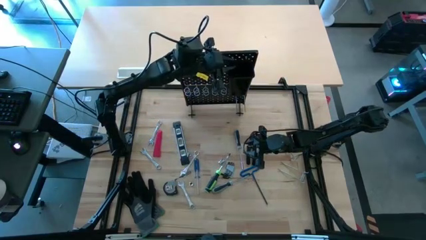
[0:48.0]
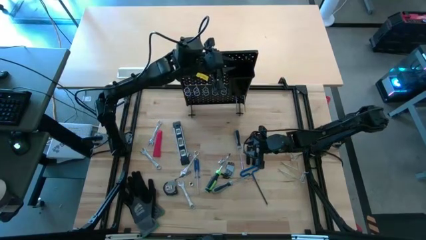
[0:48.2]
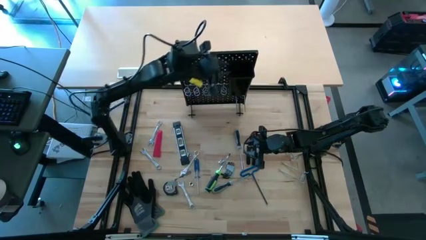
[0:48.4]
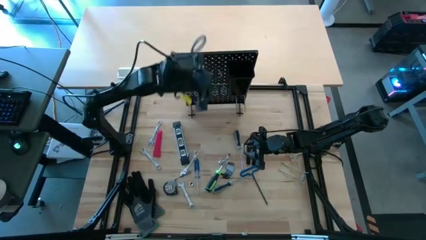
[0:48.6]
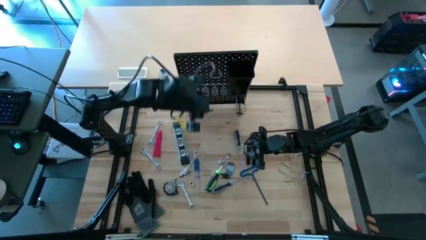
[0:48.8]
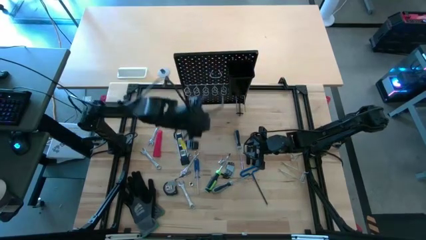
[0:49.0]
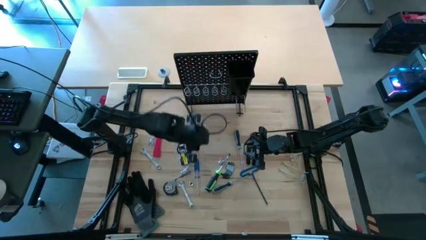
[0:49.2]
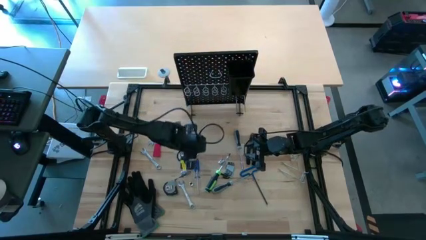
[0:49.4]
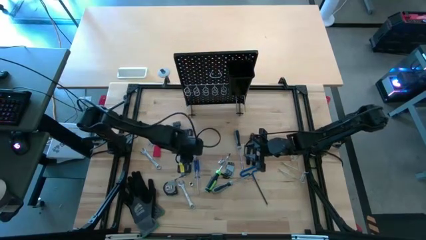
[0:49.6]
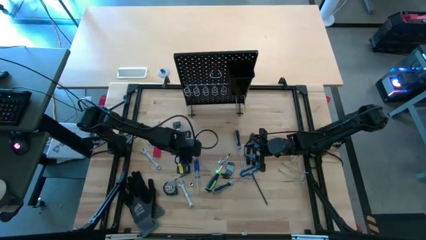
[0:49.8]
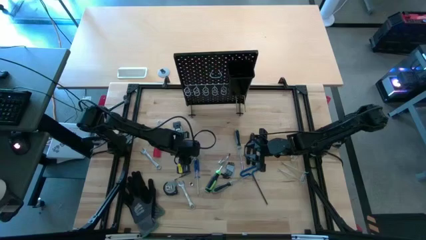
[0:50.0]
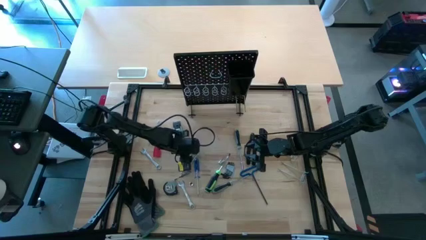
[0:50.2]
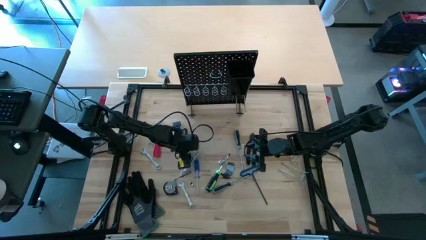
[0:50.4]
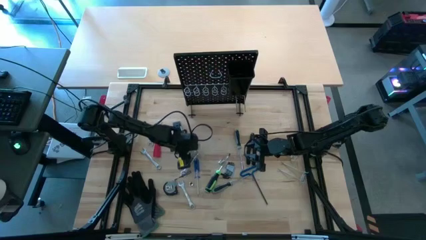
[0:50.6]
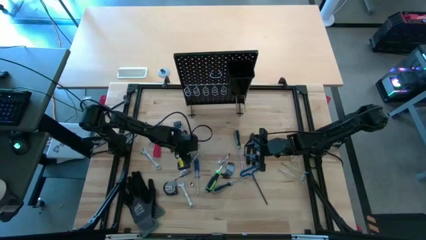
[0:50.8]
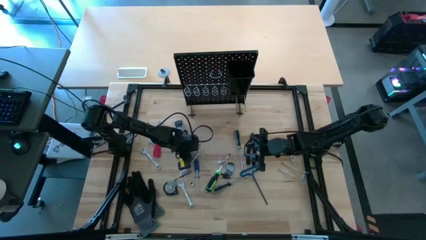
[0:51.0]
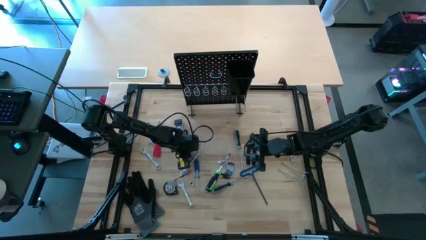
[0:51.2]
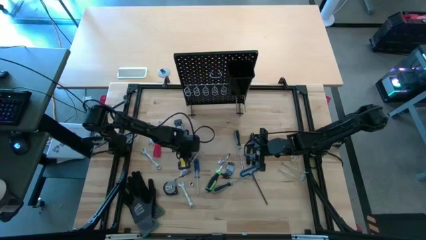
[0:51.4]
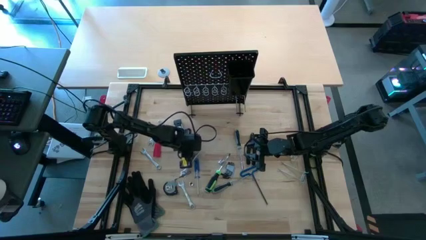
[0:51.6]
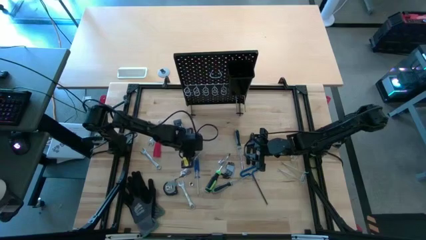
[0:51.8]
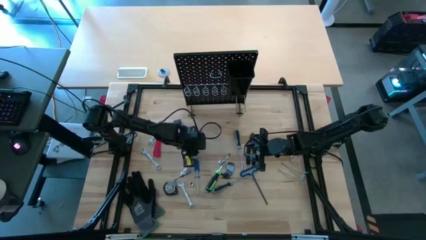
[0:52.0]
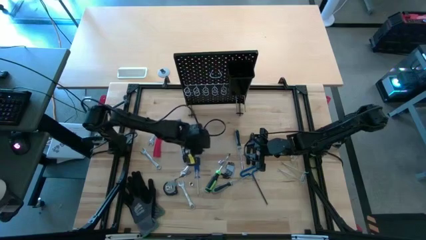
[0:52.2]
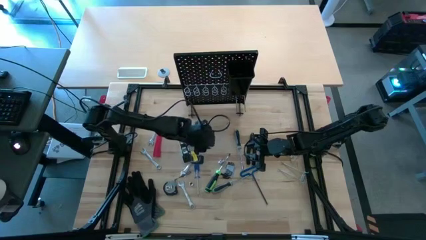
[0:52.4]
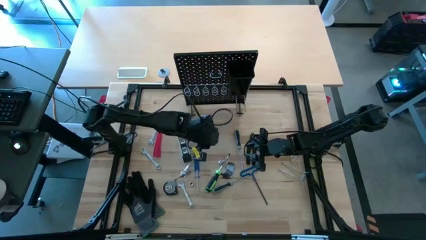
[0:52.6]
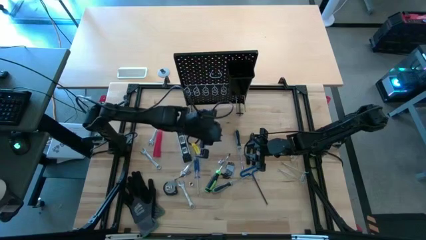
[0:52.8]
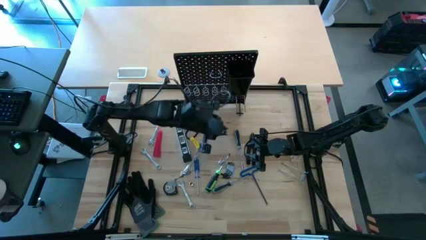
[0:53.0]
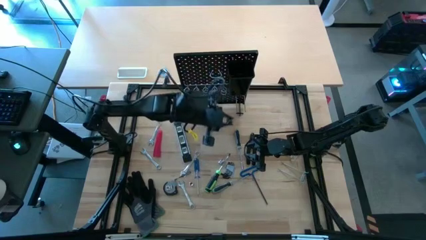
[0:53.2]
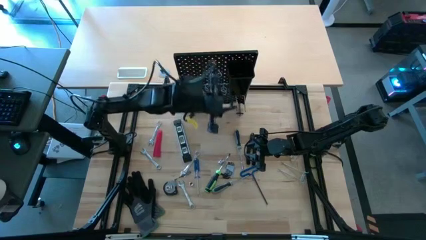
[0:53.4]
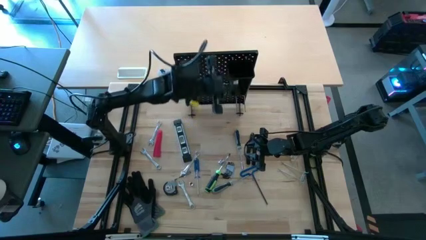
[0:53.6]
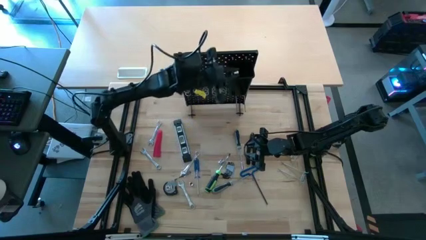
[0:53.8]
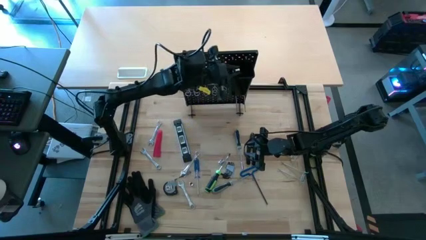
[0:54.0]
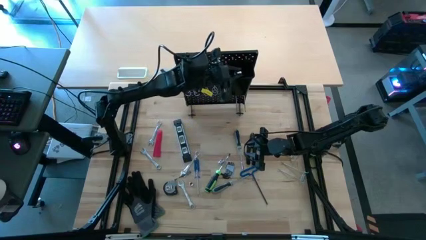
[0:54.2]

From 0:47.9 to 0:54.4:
Task: Hang tools onto peg board
Put the socket wrench into the pegboard bin

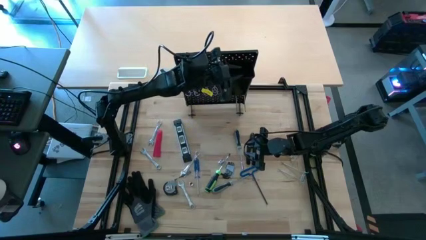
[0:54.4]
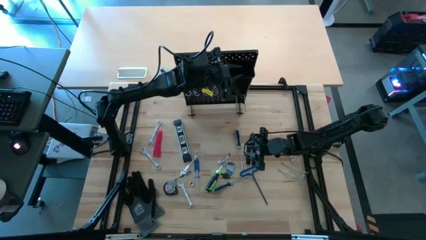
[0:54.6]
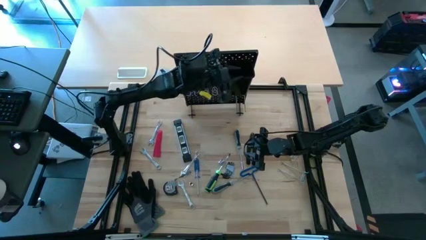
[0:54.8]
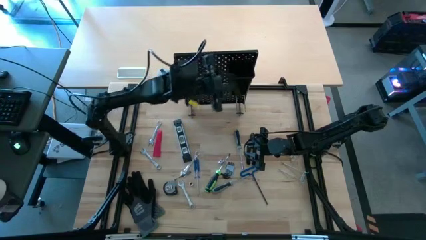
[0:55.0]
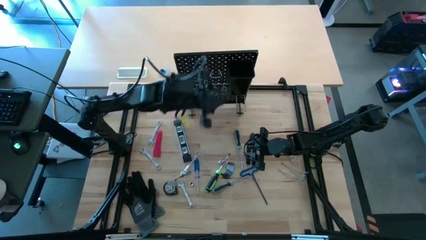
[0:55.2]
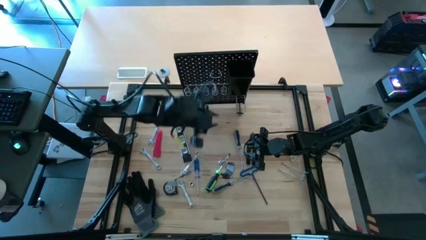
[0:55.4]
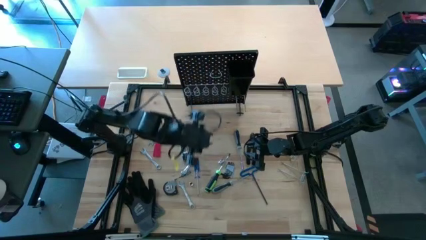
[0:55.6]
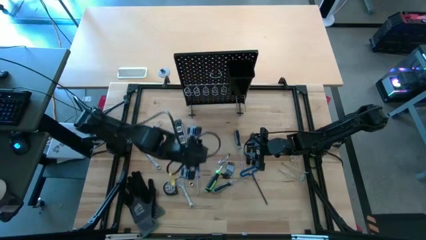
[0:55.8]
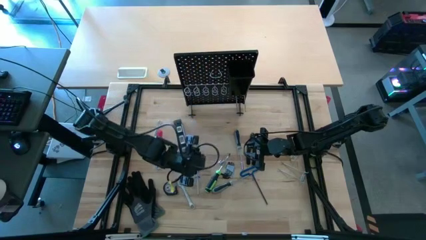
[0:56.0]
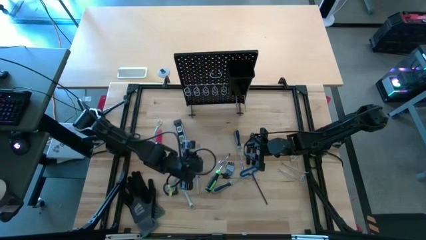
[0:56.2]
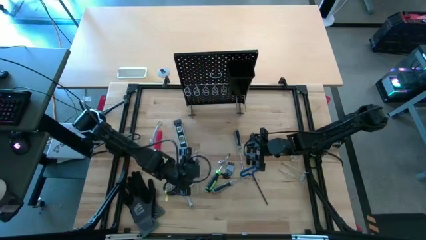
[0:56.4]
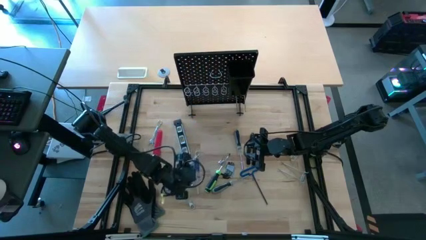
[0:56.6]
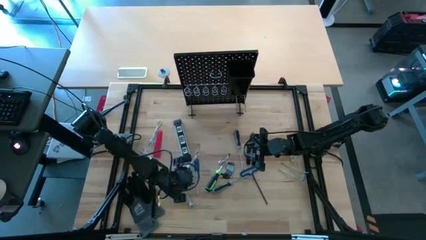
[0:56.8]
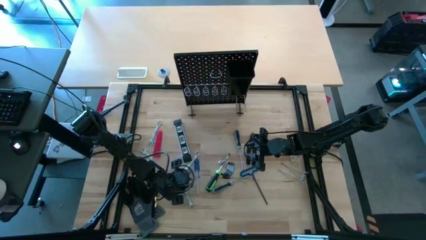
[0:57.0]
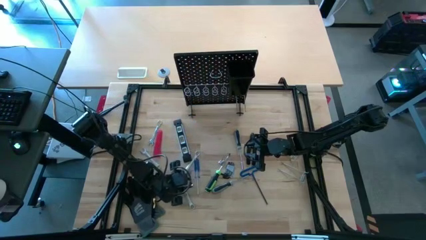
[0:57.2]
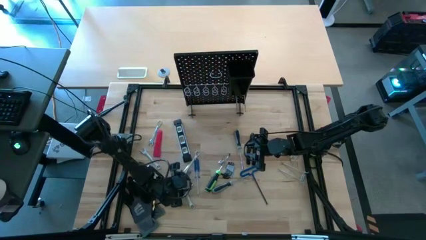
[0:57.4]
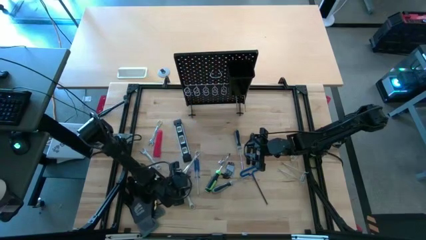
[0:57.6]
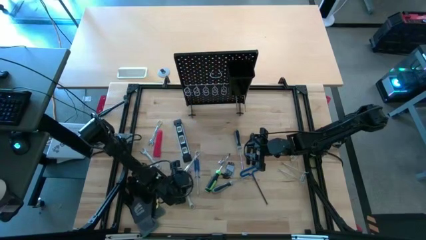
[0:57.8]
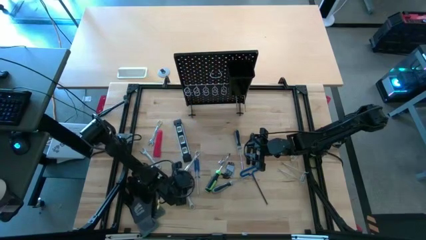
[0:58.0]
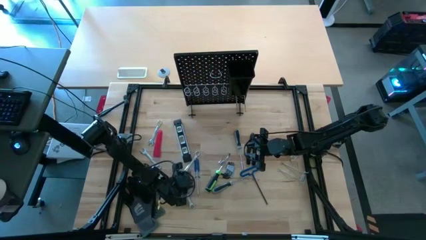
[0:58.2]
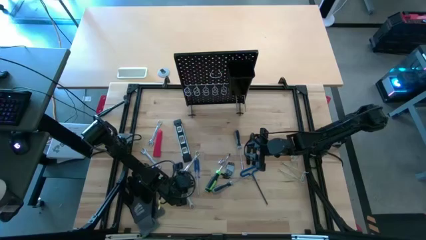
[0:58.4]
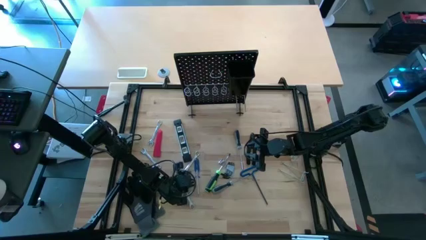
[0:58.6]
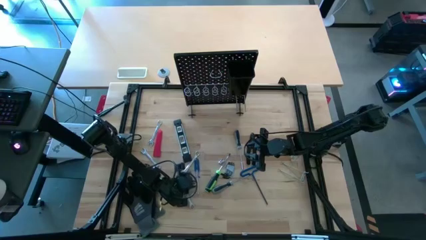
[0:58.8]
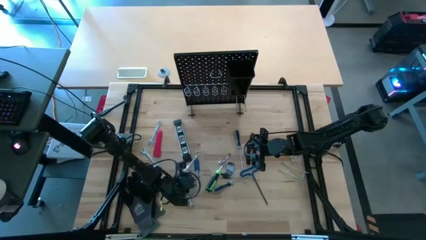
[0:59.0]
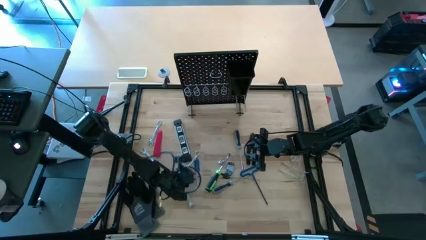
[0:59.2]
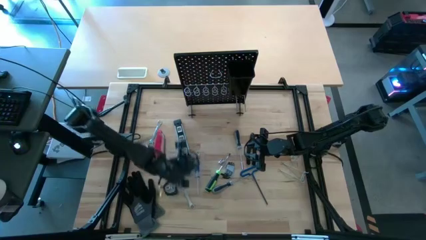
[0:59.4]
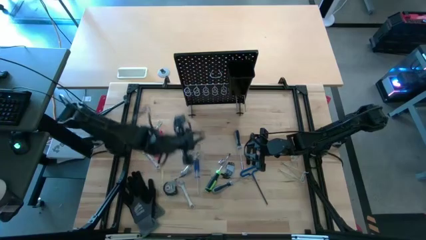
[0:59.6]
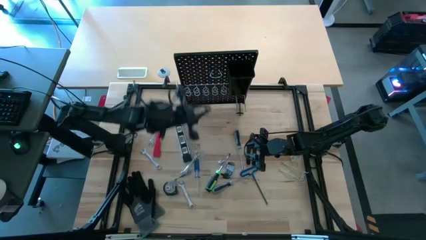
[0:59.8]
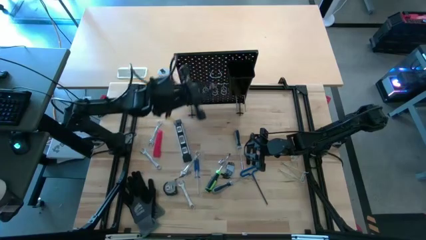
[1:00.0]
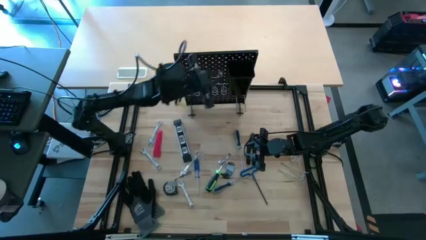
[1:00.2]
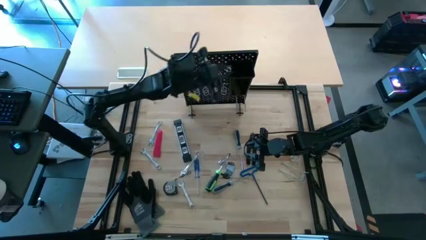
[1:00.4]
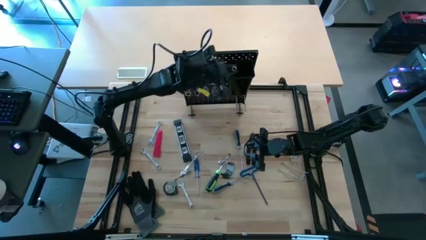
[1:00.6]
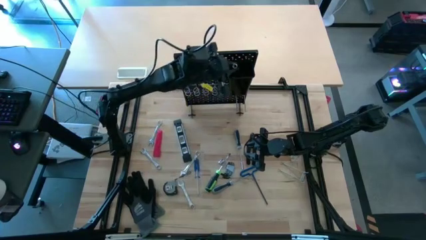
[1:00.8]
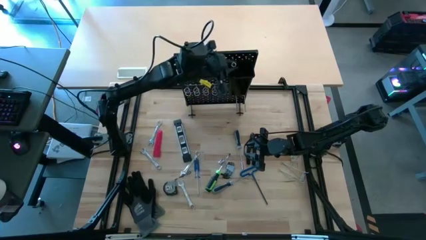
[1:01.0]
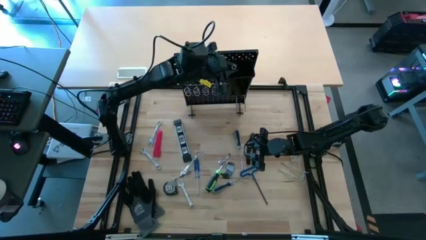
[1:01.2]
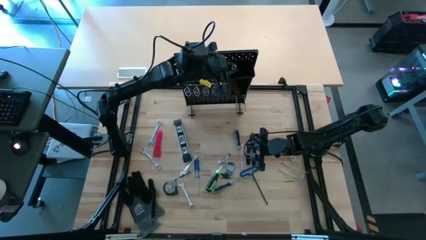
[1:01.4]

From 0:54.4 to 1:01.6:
Put the socket wrench into the pegboard bin

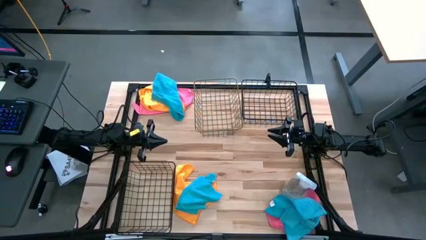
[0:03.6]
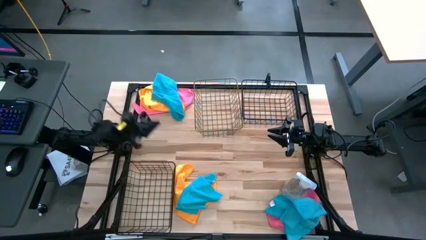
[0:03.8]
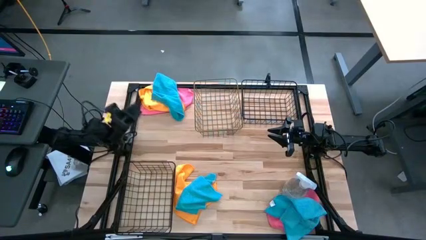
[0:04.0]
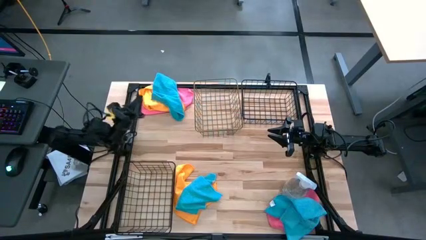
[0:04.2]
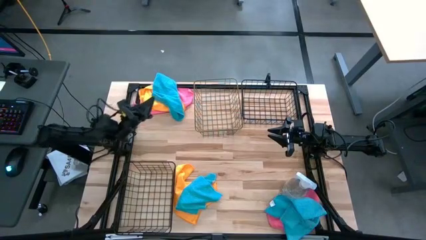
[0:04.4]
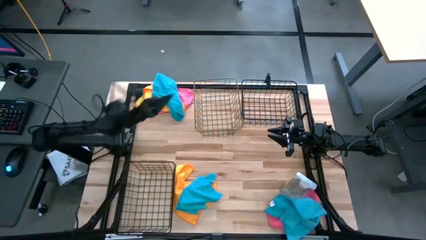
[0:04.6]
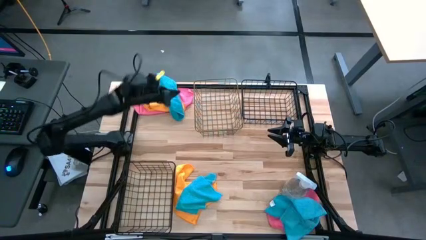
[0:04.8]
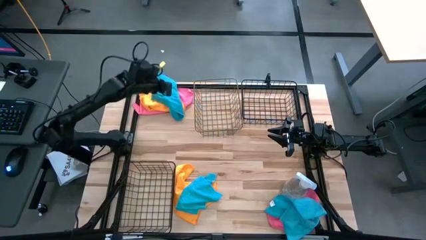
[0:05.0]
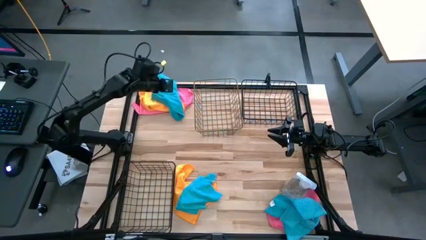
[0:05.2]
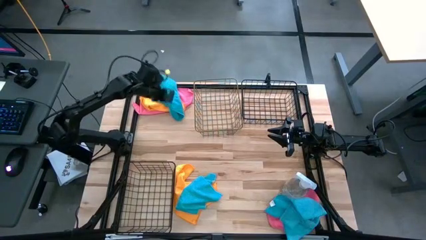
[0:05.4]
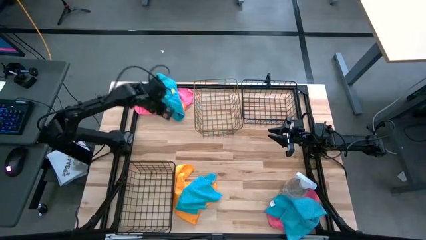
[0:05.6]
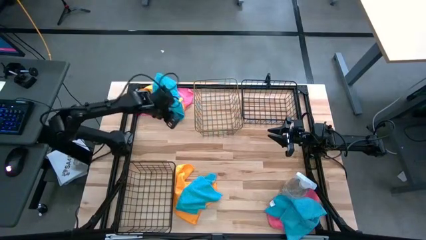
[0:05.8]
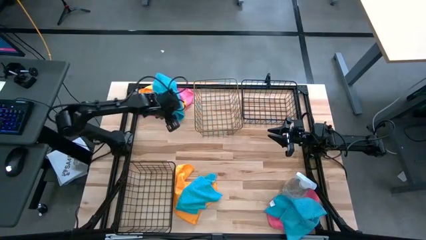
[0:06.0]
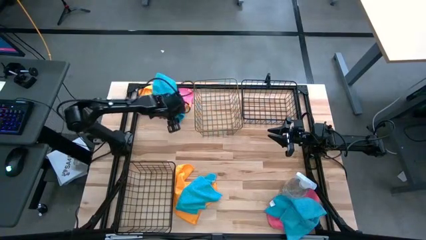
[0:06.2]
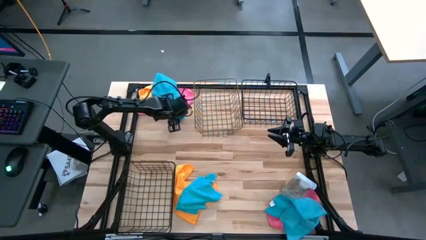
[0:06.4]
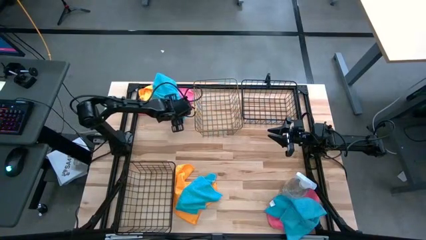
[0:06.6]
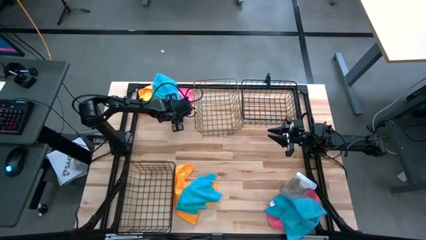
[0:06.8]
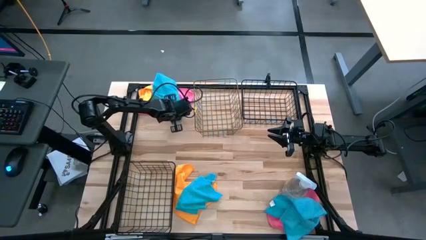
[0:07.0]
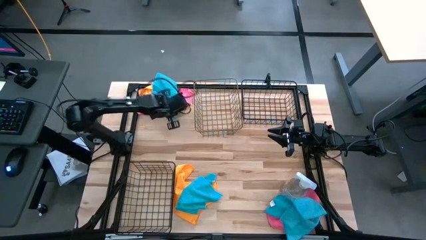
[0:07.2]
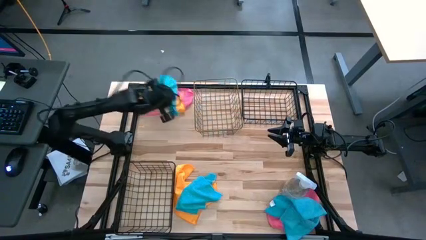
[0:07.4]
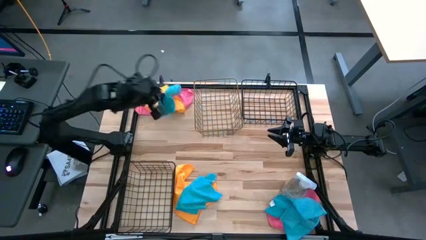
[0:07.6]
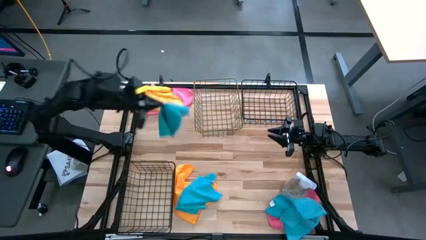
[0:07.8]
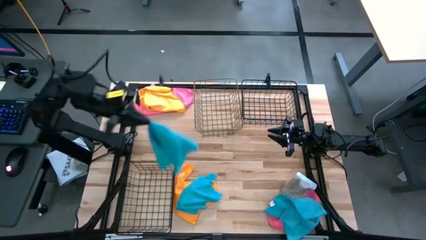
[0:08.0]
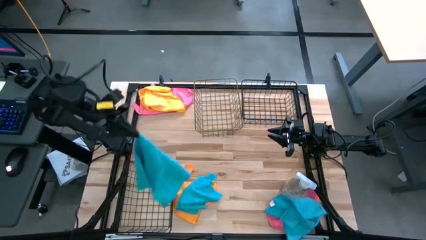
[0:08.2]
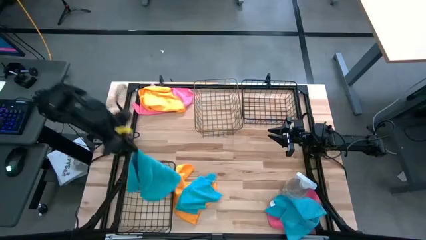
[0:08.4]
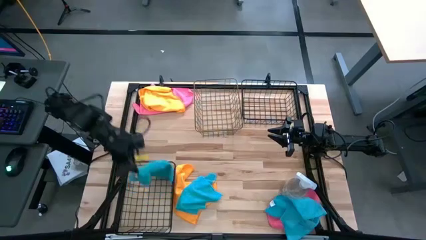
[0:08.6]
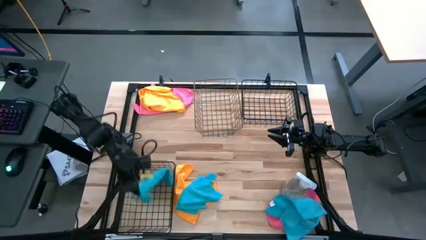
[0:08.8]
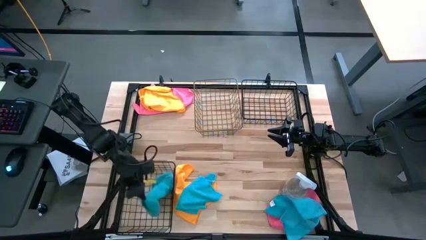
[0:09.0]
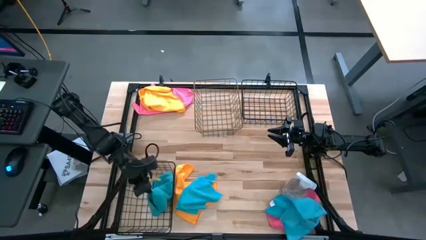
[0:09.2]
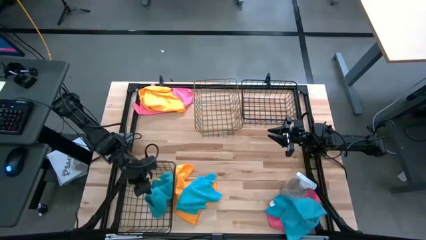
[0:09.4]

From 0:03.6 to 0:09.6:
Task: Sort microfiber towel by color & place in baskets
Put the top blue towel into the bottom black wire basket
